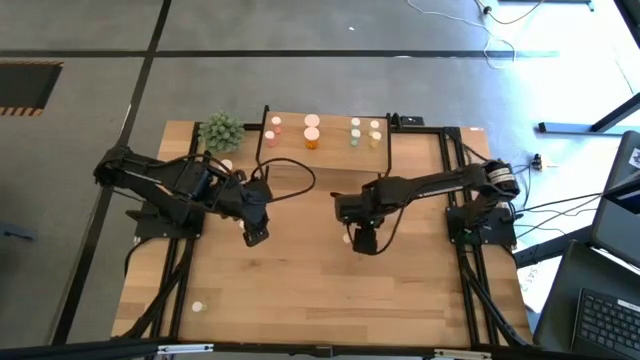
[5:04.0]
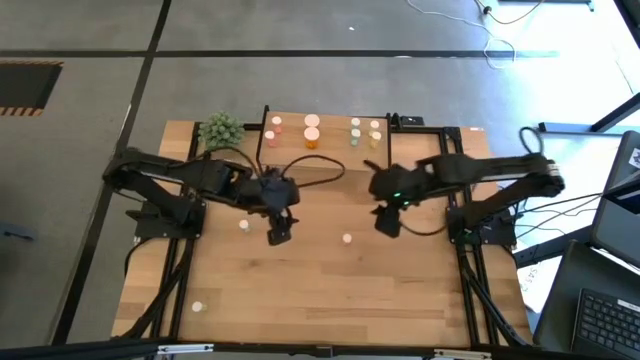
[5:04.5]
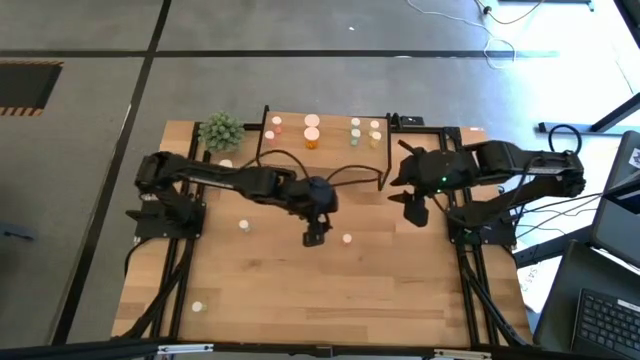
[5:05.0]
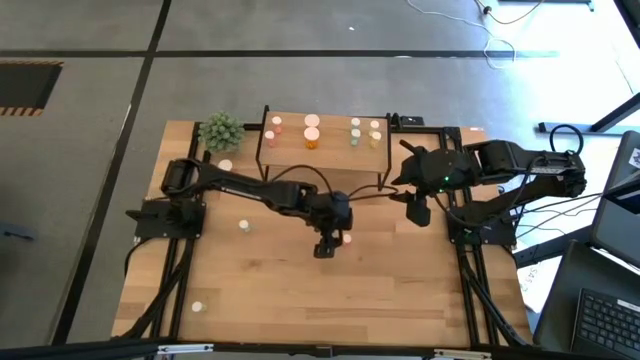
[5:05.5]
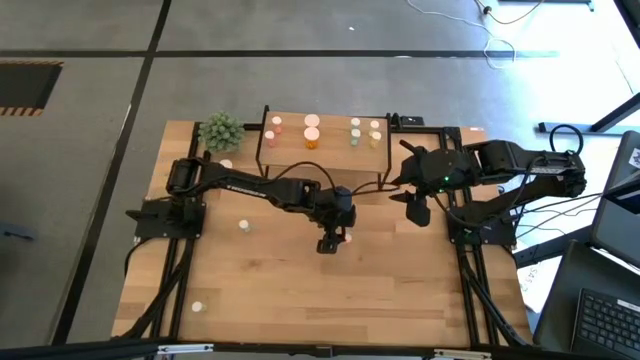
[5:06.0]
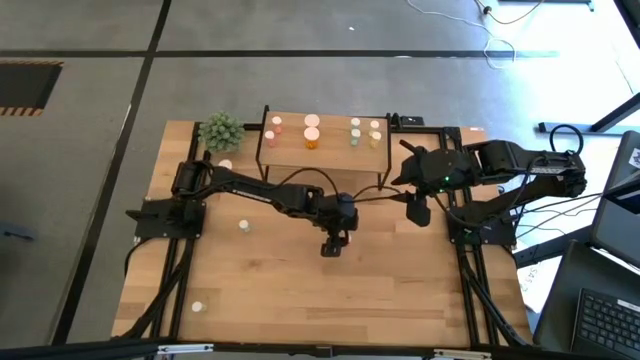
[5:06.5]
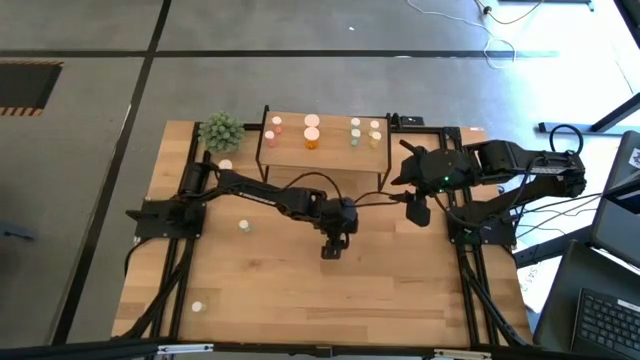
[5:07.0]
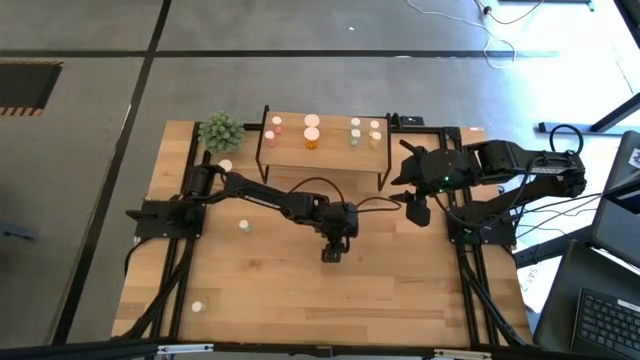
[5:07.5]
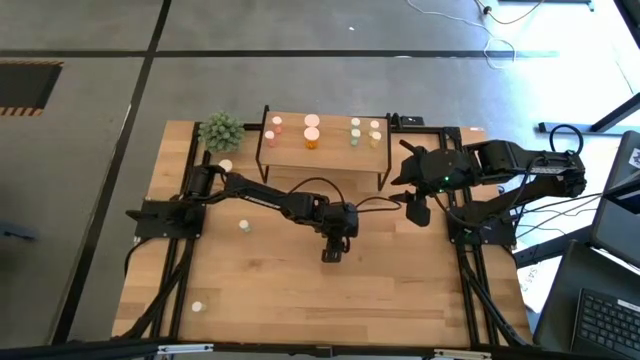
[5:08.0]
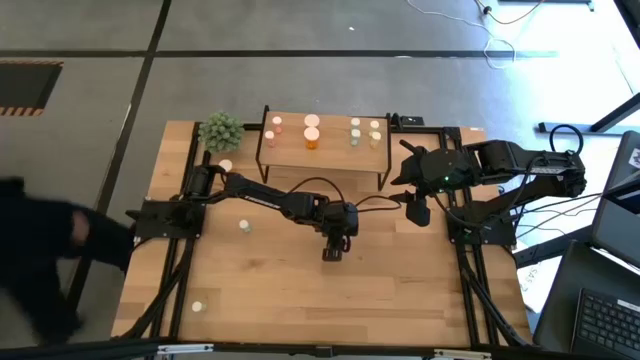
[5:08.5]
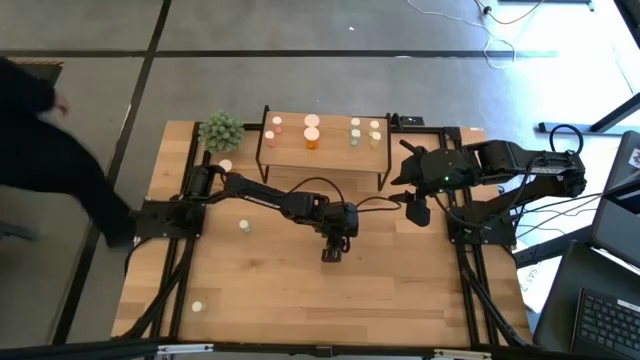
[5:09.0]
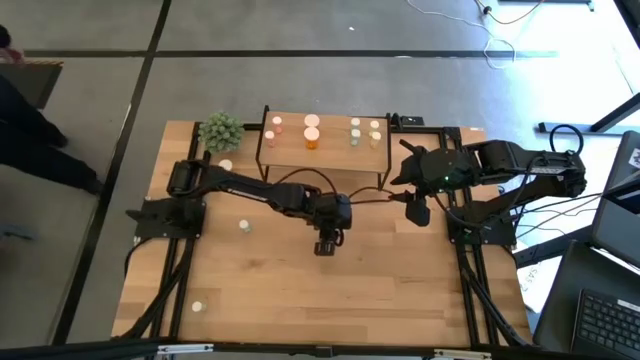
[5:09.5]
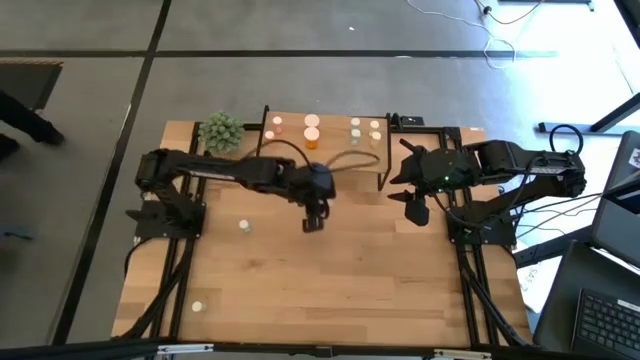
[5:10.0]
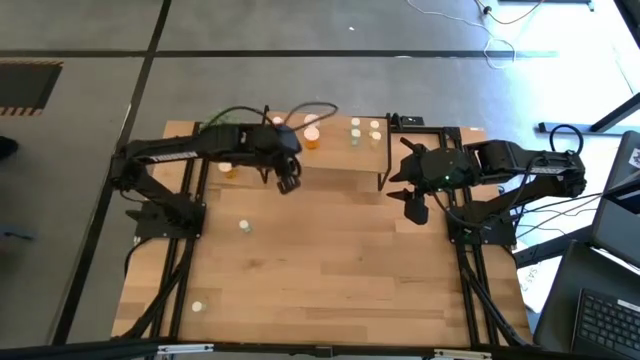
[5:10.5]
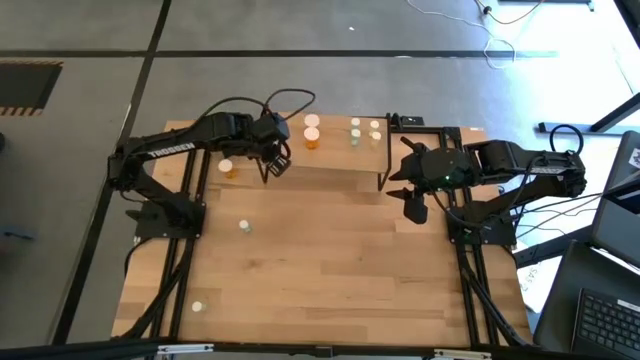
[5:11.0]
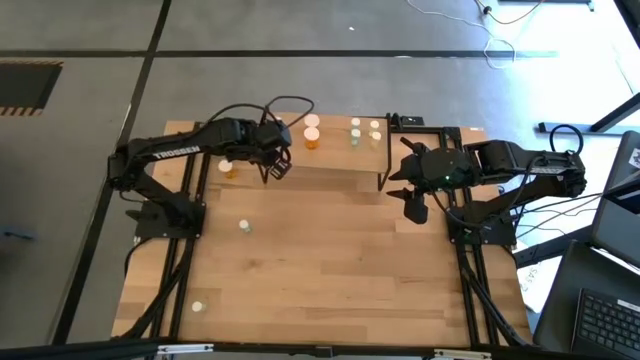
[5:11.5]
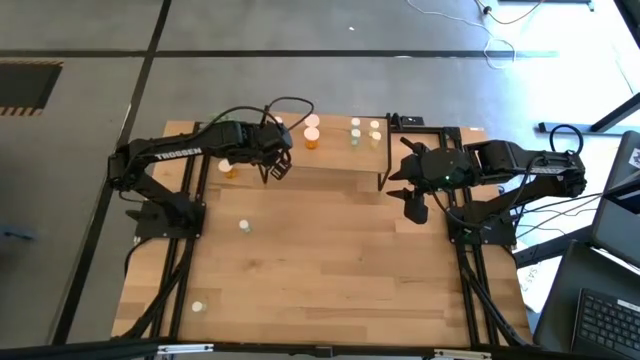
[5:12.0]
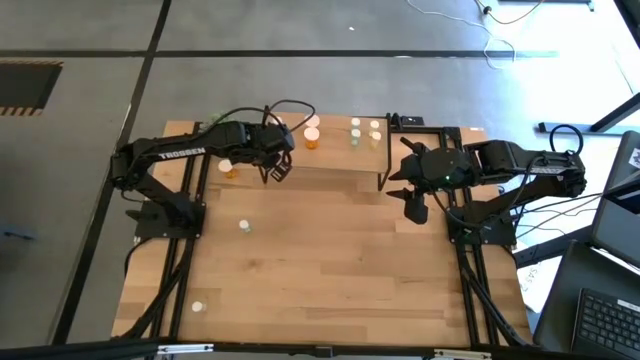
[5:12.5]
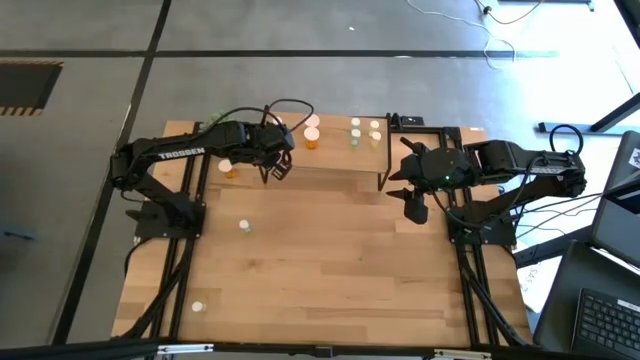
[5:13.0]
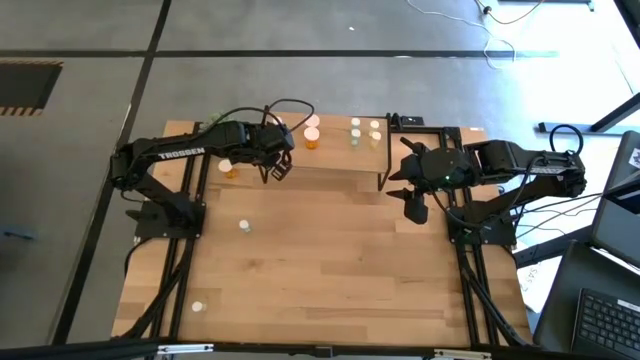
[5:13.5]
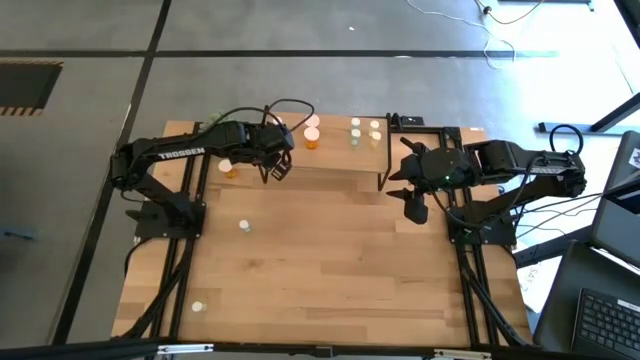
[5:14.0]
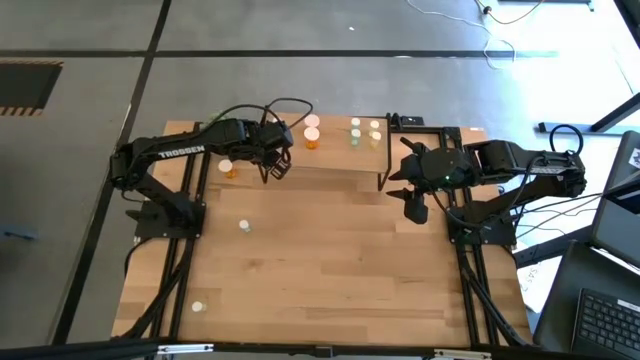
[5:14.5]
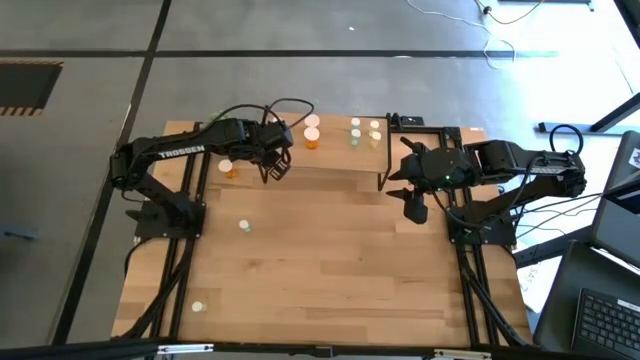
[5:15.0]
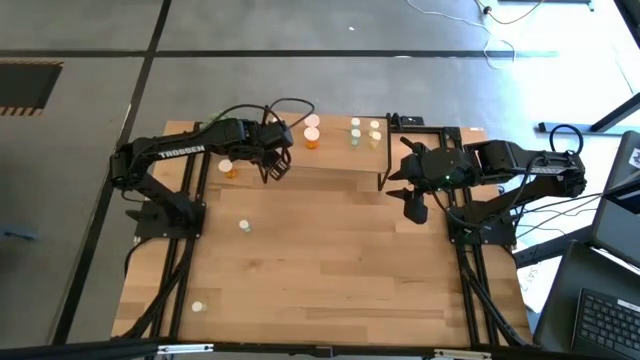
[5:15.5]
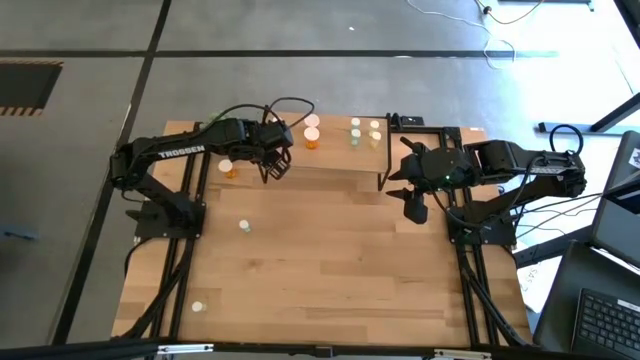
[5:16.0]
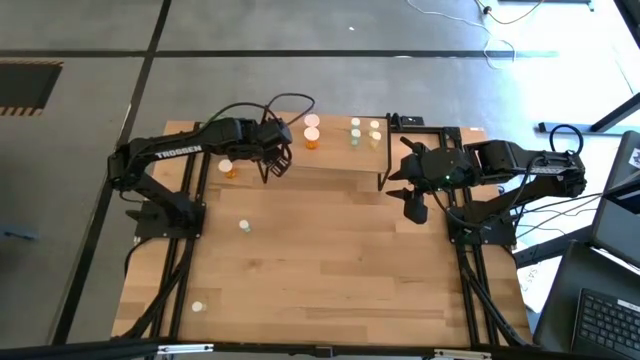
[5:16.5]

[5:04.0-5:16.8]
Task: Pick and place medicine bottles onto shelf by color
Put the red medicine bottle on the shelf, aligned with the other red medicine bottle

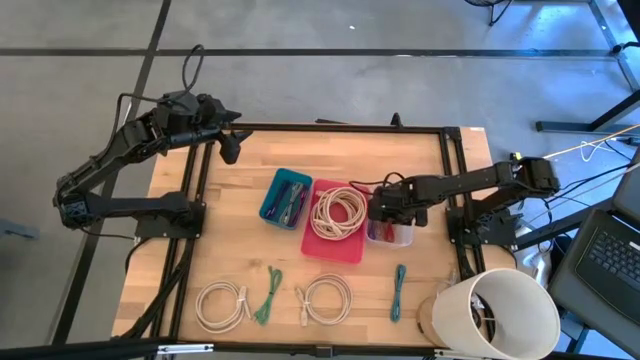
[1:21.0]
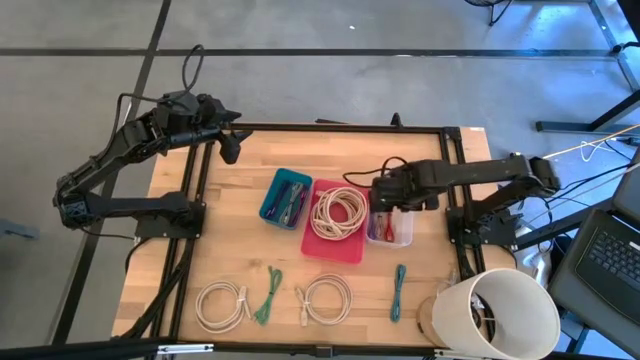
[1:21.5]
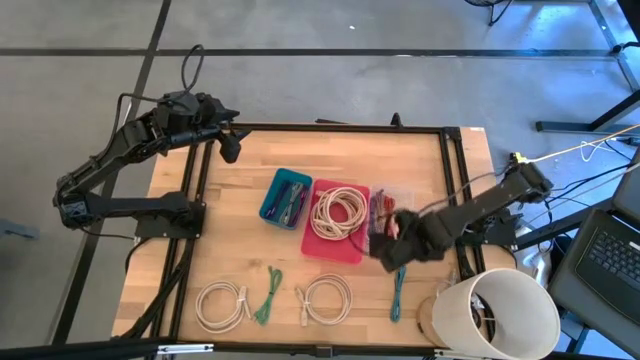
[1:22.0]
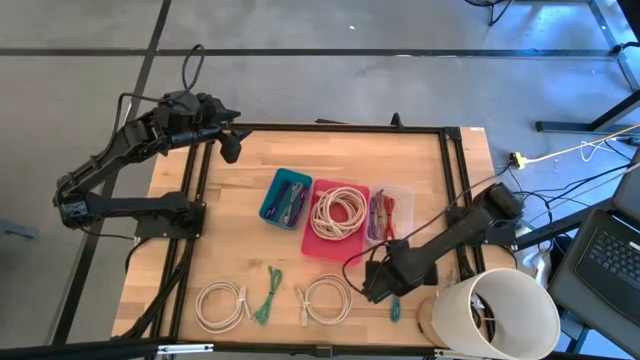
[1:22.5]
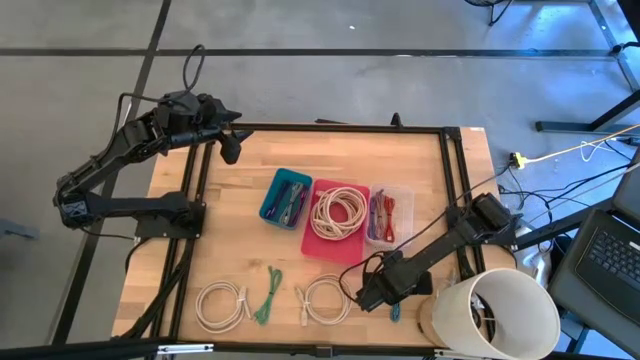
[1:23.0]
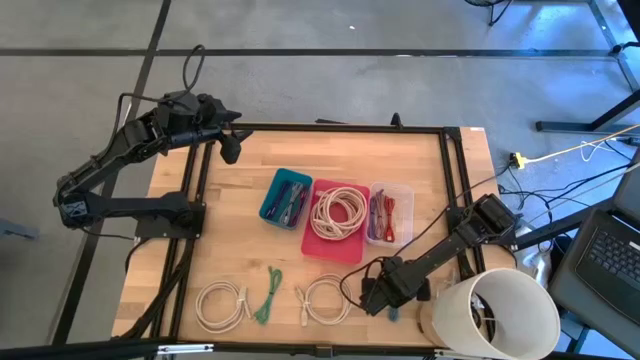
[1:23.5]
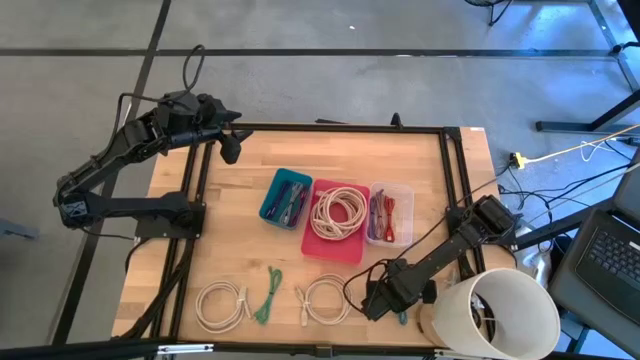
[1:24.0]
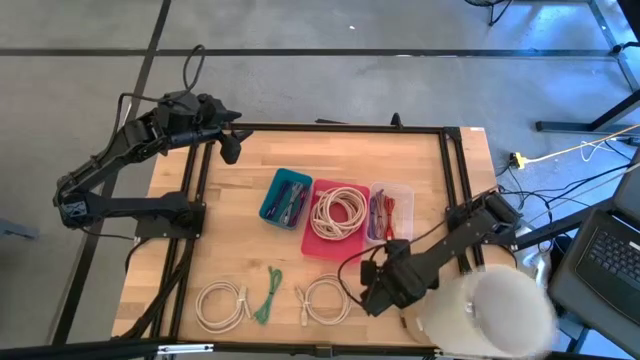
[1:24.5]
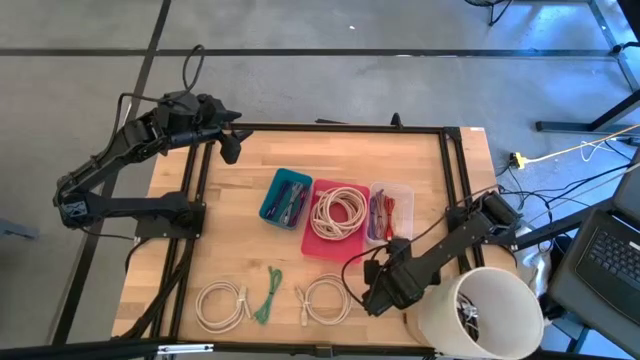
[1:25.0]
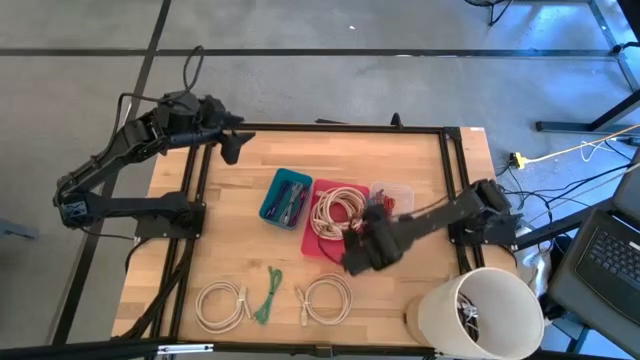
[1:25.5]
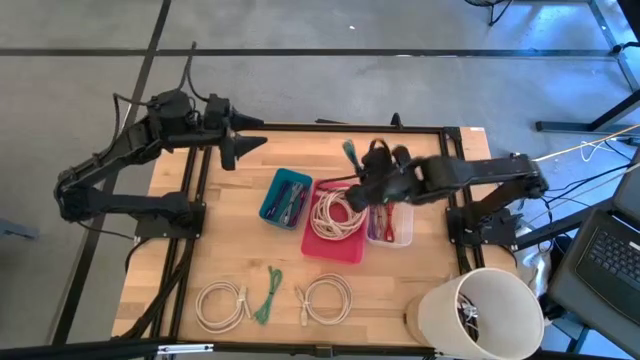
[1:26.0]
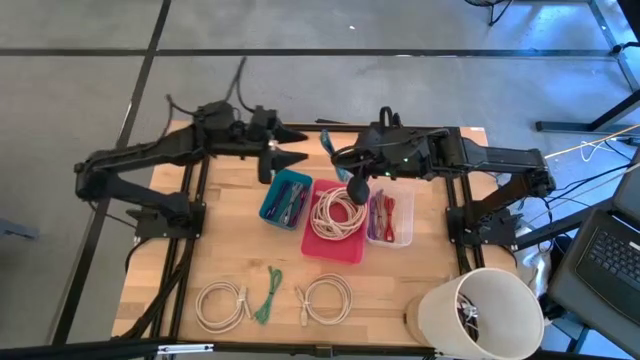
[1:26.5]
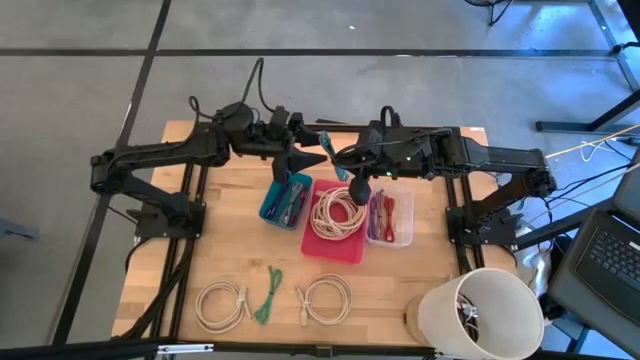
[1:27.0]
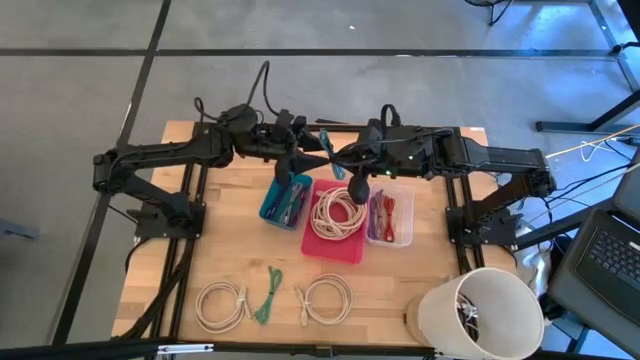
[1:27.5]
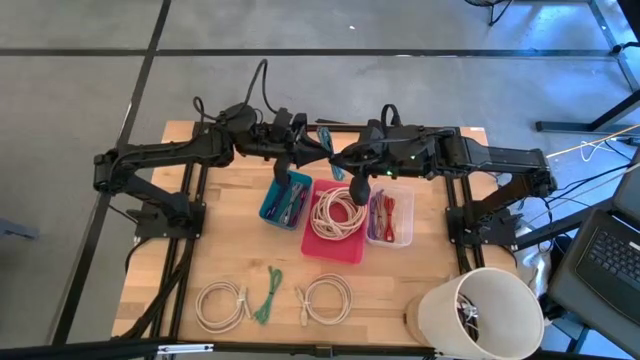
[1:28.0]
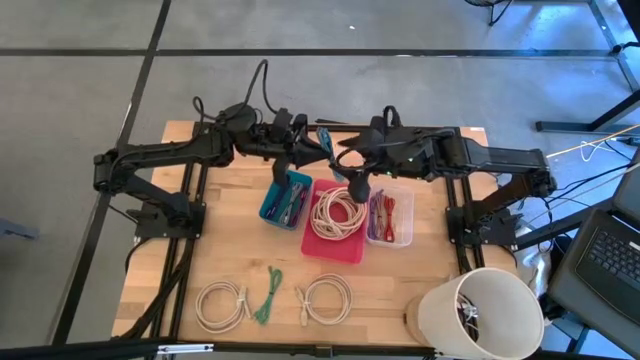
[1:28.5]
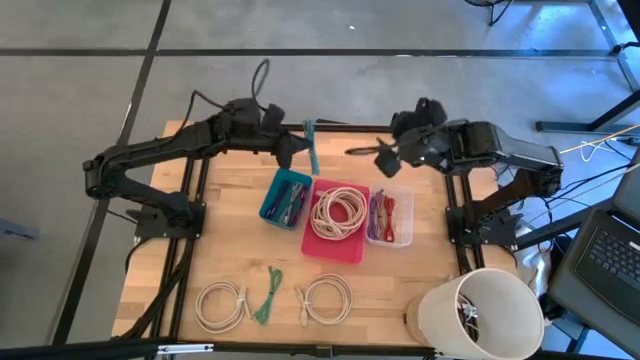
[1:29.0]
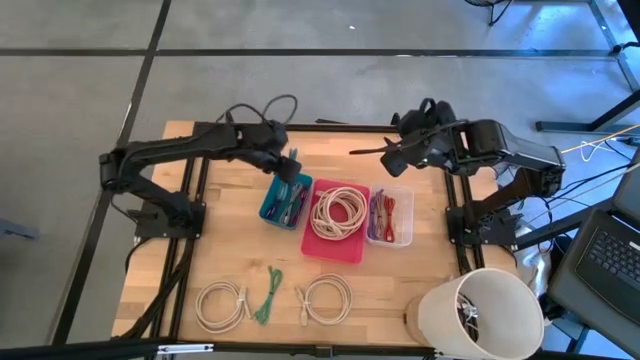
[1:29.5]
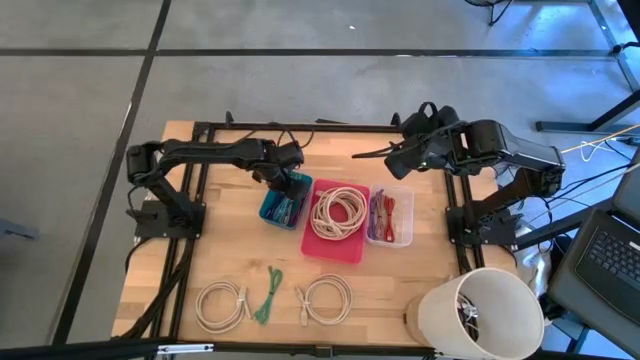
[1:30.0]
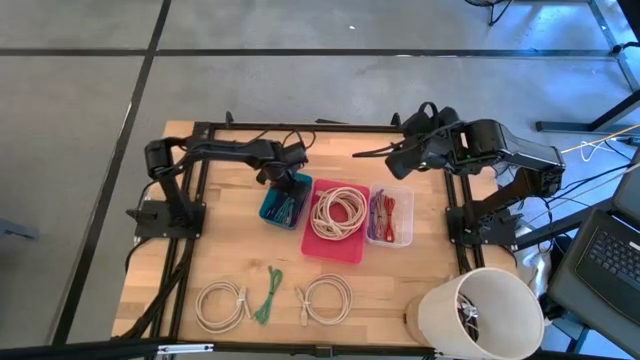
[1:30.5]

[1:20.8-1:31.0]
Task: Pick & Place USB Port
Put the blue and black charger cable into the blue bin
